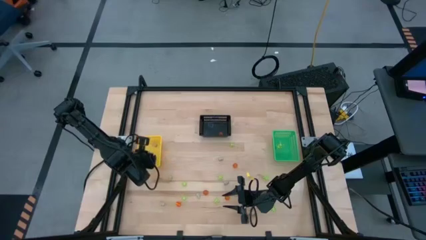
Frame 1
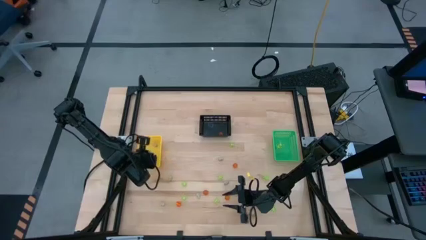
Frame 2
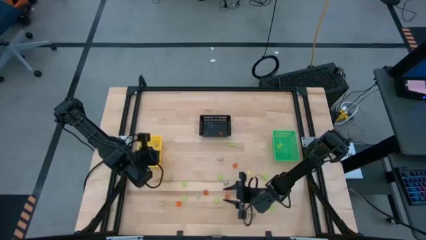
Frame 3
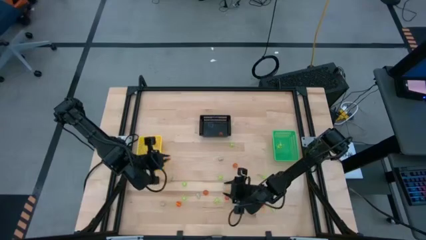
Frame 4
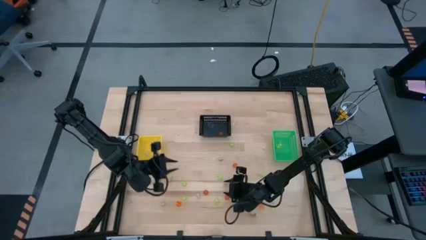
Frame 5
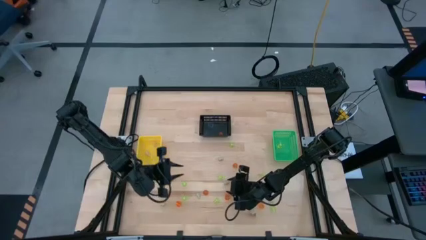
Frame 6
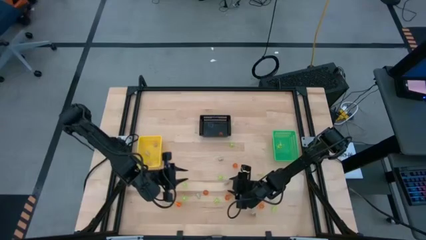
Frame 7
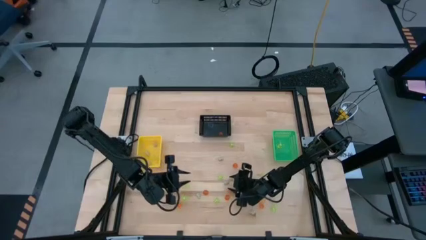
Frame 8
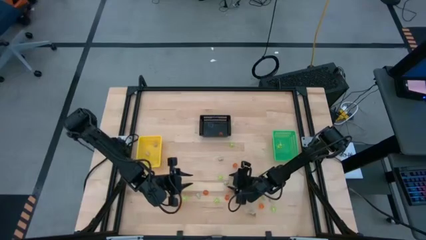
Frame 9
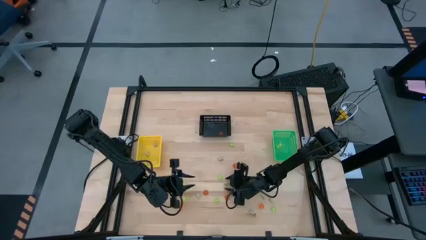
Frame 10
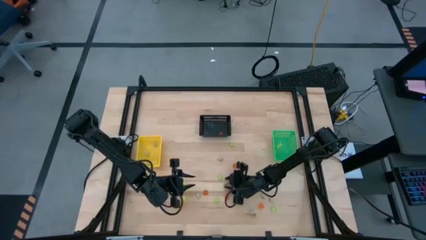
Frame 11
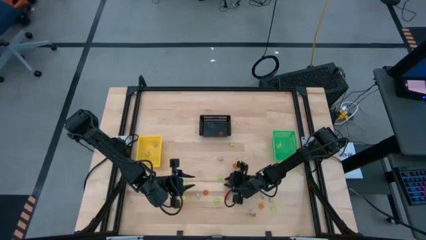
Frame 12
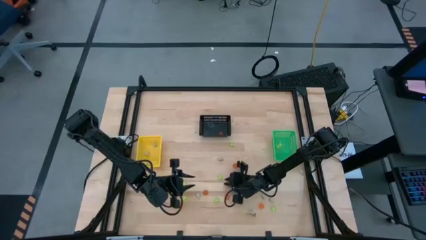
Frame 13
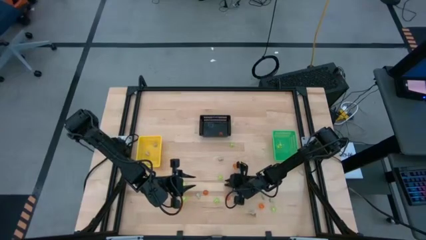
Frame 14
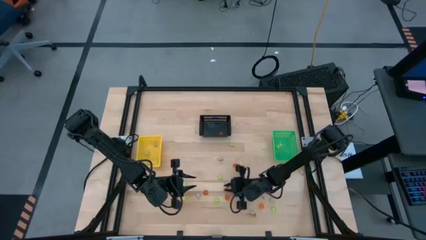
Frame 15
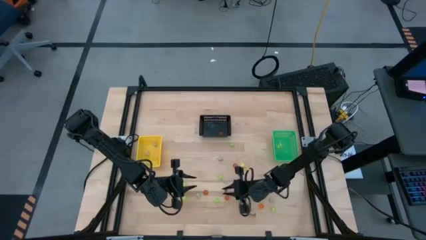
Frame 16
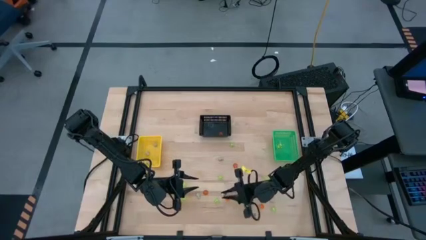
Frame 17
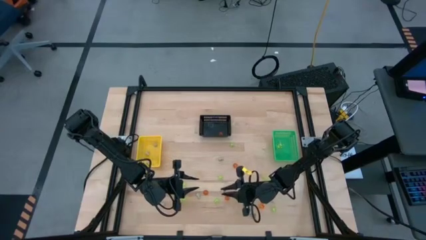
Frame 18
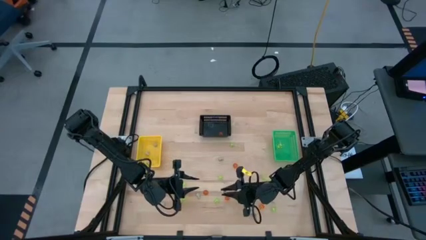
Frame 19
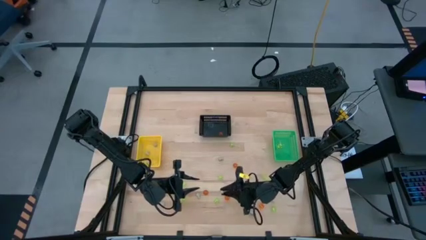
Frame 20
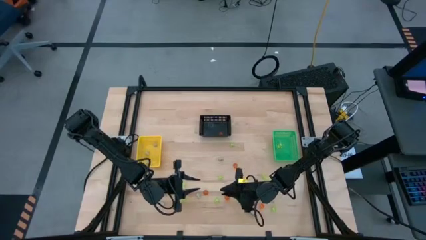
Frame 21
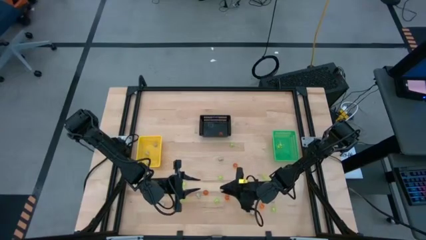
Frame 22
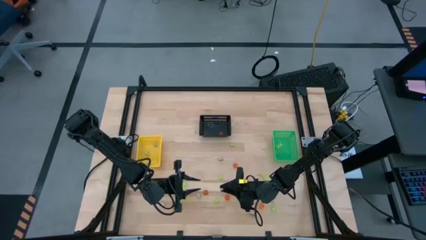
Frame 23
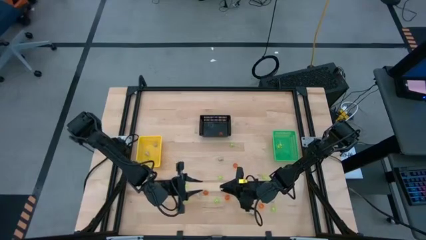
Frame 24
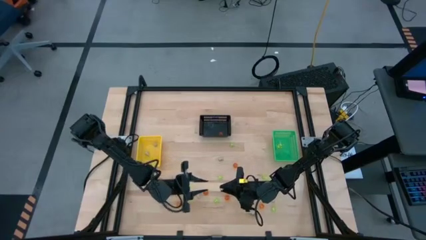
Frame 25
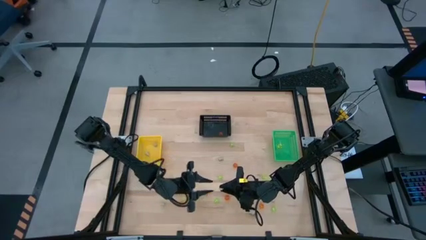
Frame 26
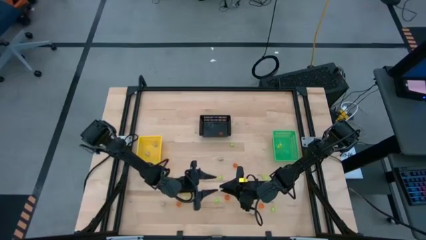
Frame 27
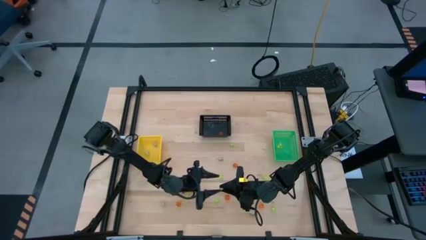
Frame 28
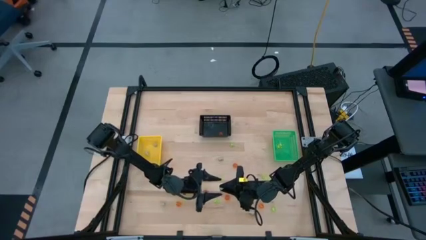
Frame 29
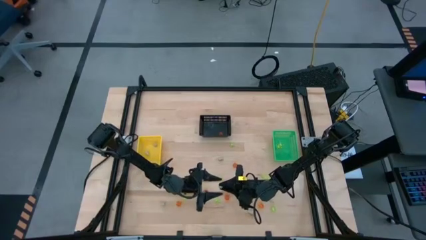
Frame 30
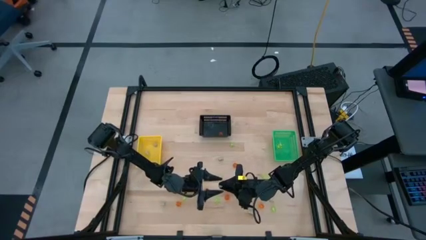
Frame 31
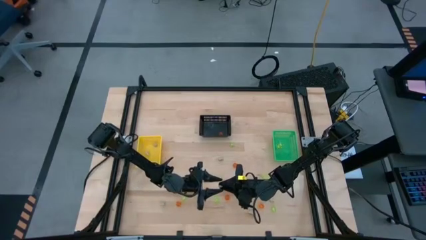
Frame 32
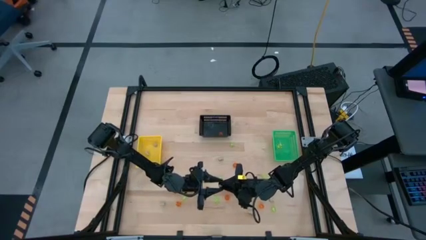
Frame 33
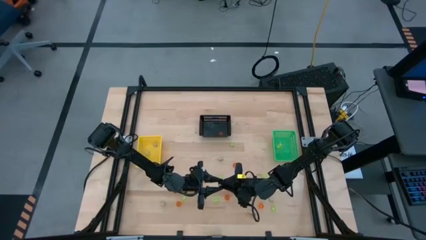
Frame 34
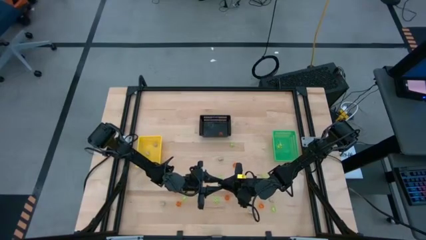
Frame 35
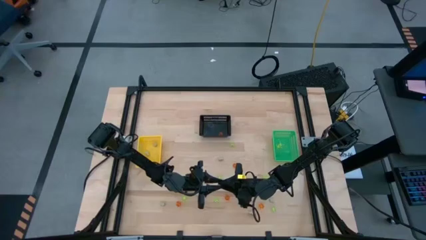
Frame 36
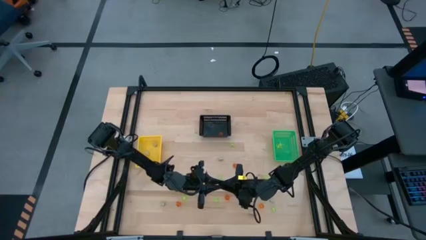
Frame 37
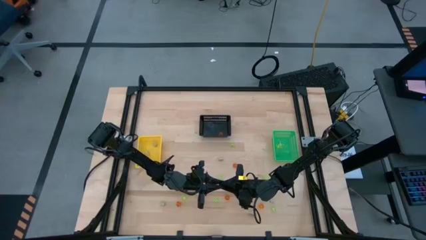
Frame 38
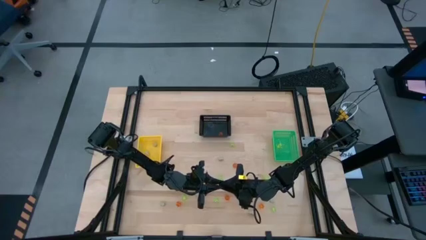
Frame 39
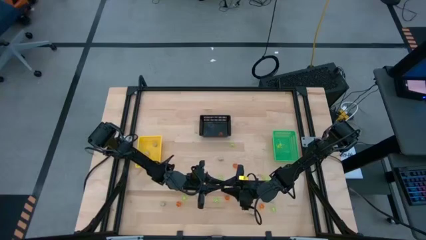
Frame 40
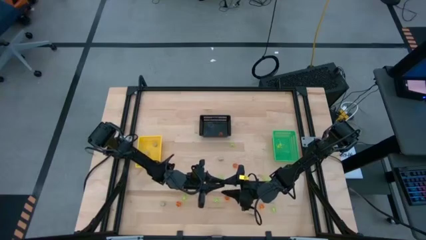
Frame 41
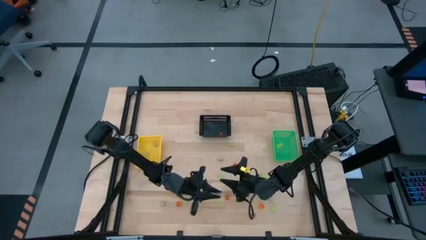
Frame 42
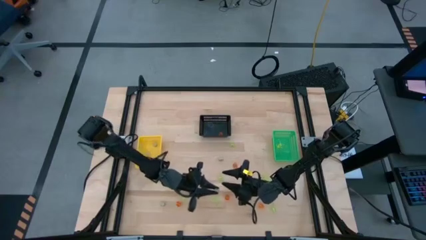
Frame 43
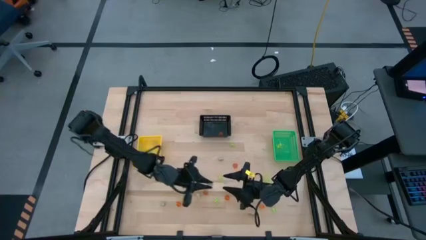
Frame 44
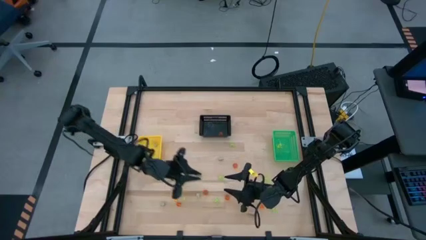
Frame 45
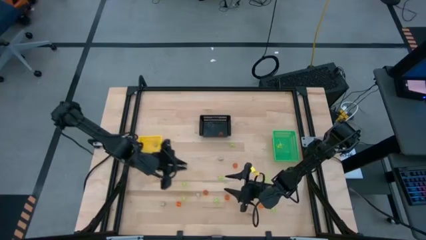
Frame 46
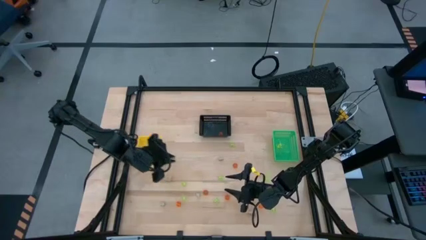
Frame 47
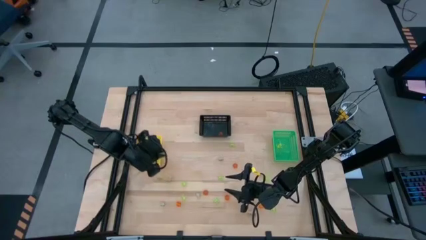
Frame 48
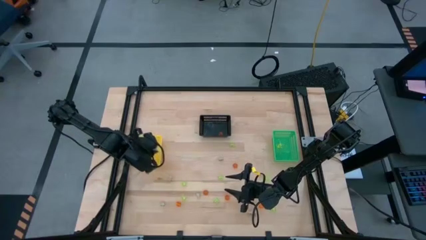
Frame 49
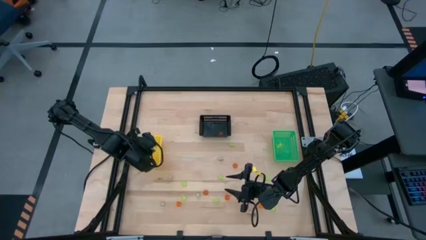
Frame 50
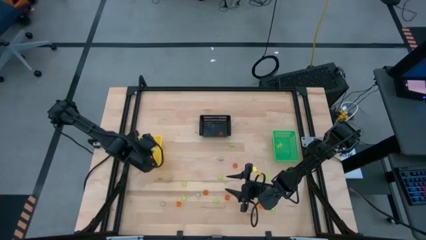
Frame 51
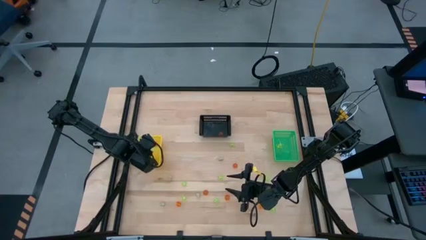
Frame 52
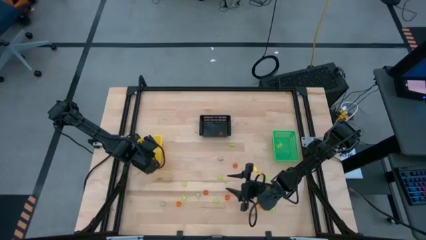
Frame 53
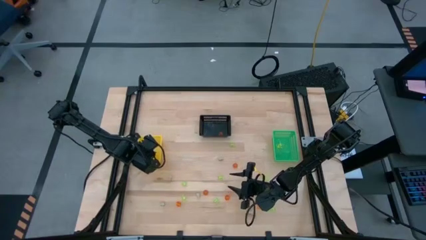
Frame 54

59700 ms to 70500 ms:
Task: Sort Halloween decoration
Put the skull toy into the yellow bin

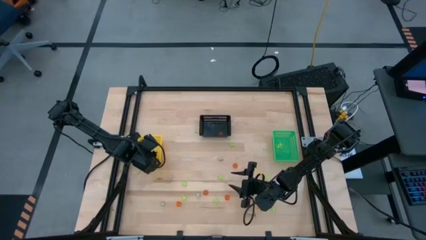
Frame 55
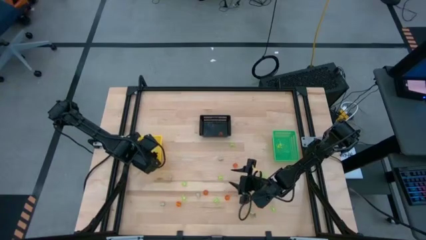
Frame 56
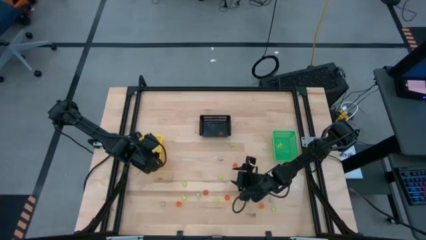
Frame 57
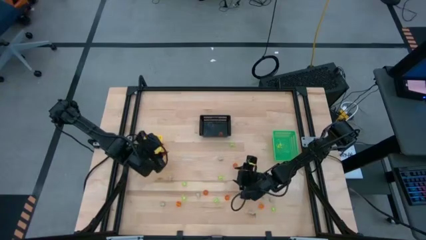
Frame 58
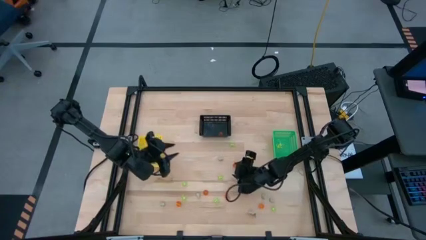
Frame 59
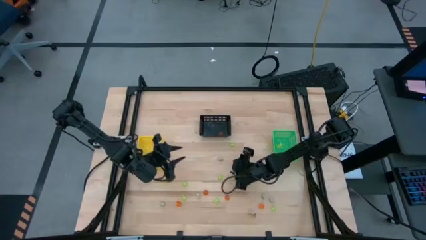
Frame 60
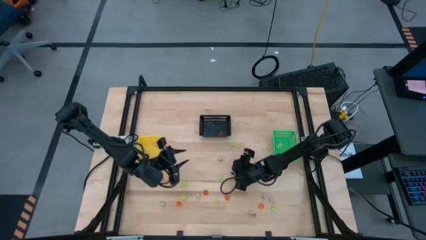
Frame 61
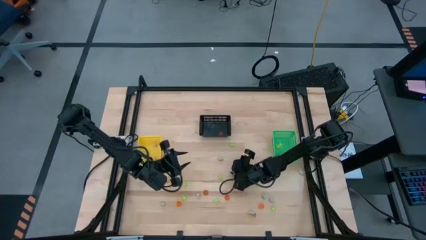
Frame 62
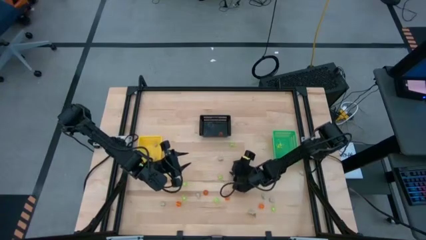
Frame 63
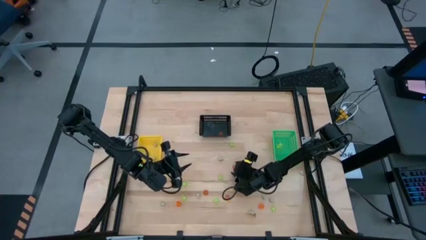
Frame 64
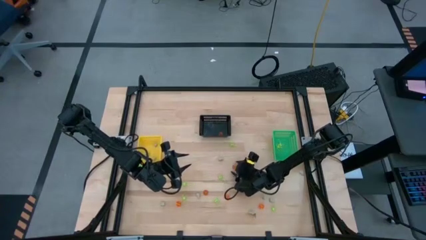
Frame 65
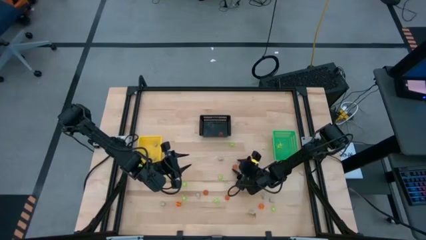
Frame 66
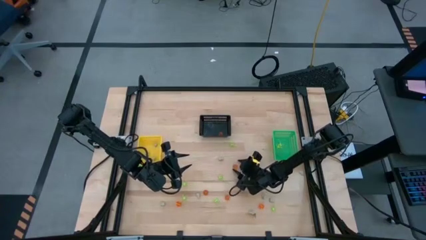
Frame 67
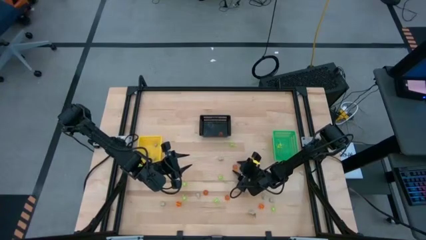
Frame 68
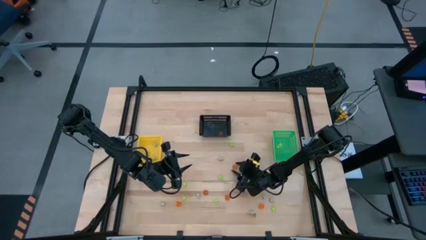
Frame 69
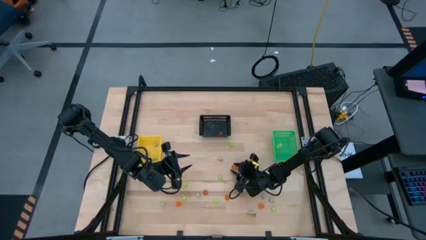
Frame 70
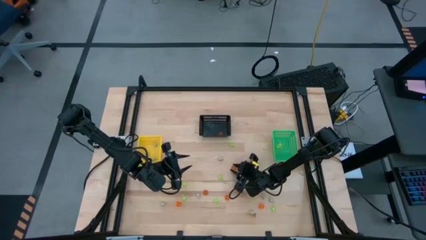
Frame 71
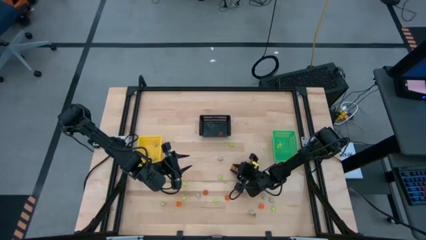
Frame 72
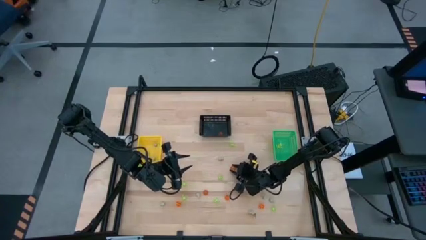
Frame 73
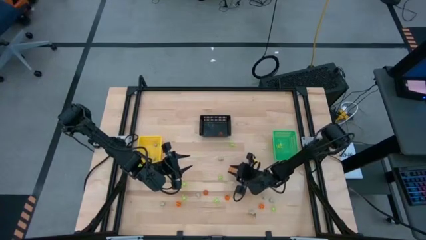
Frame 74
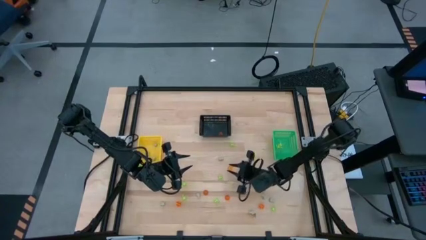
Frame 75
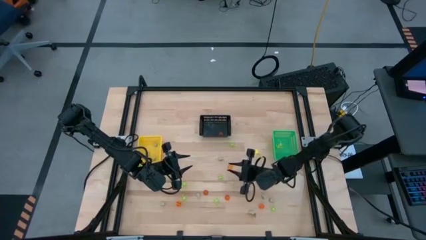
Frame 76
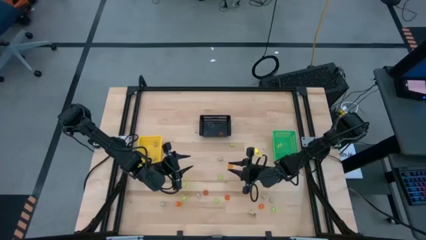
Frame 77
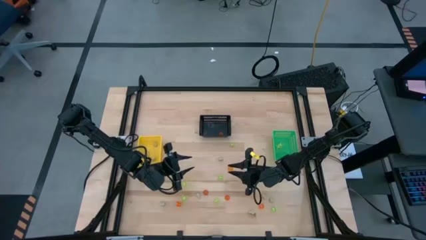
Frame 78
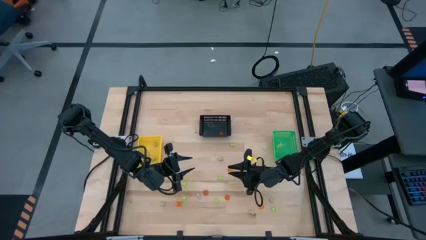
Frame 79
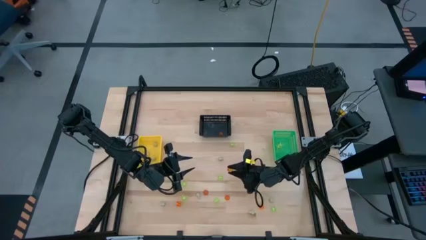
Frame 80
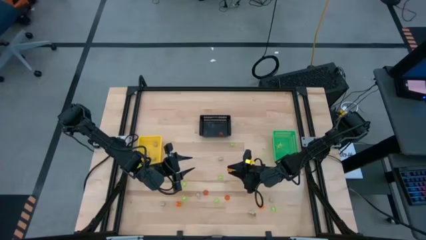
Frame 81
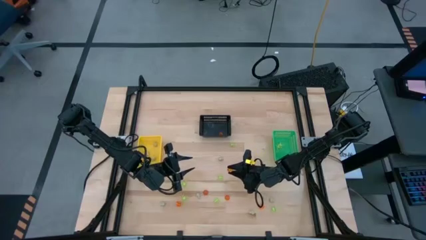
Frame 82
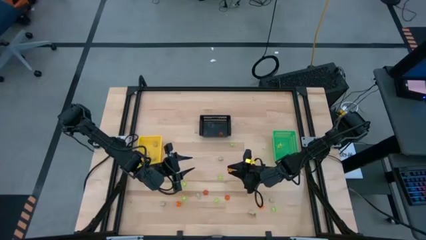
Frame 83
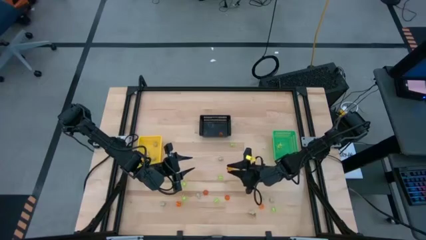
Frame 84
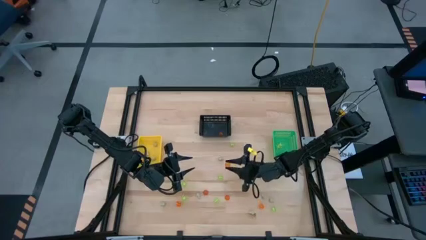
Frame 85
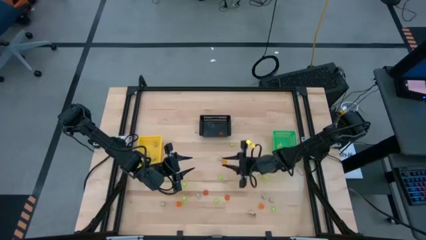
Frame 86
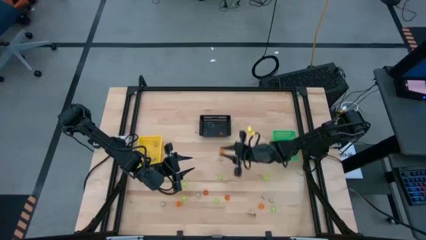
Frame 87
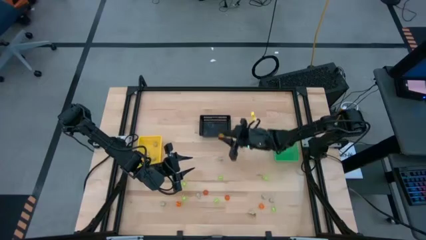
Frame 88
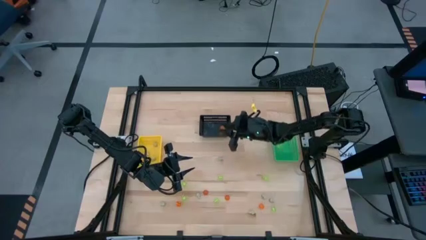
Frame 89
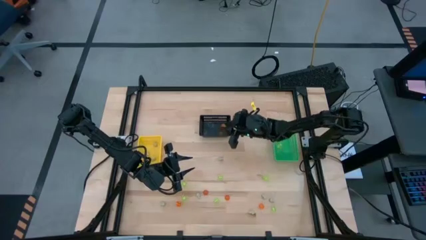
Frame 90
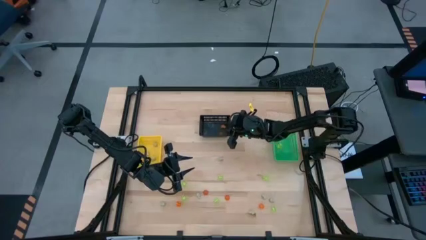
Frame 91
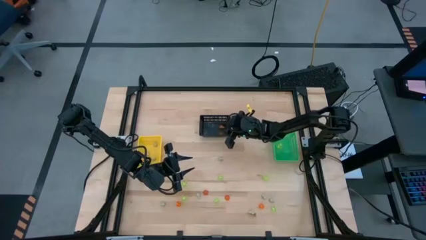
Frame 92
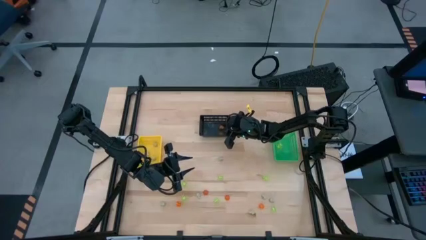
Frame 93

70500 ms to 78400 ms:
Put the orange pumpkin toy into the black bin
